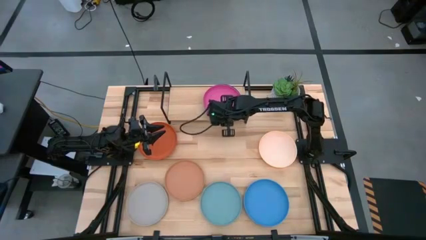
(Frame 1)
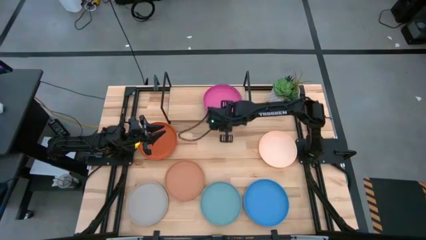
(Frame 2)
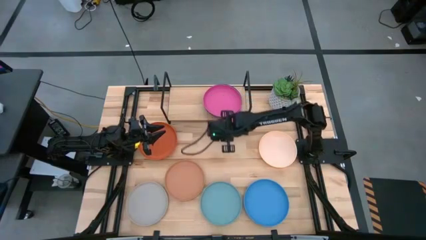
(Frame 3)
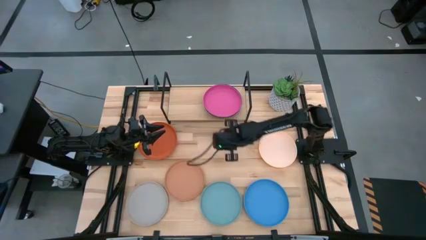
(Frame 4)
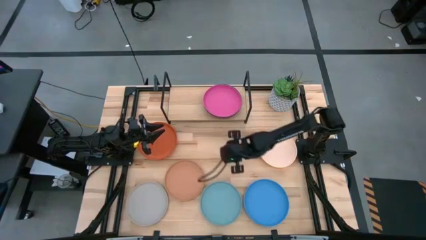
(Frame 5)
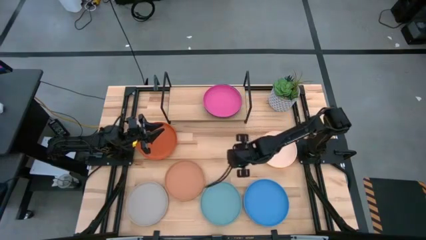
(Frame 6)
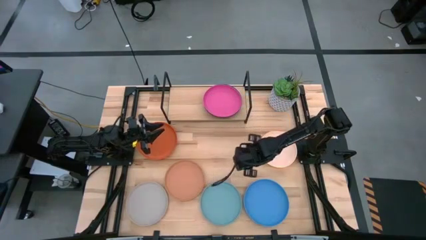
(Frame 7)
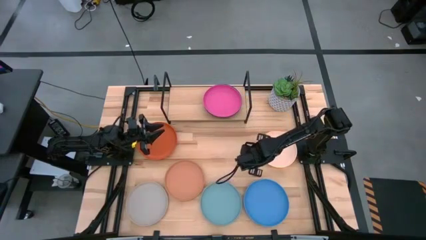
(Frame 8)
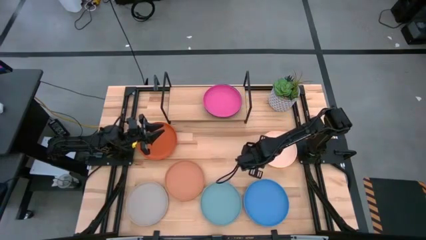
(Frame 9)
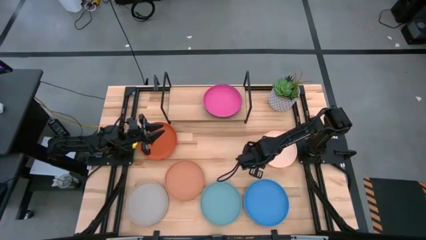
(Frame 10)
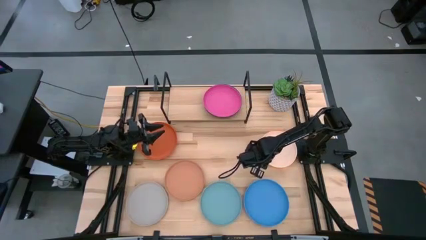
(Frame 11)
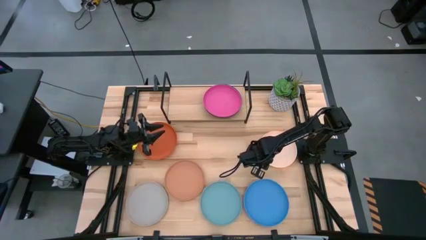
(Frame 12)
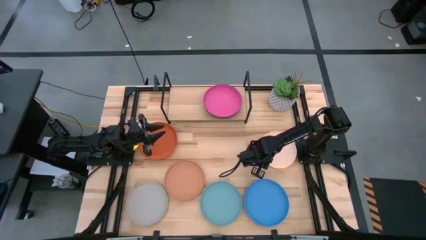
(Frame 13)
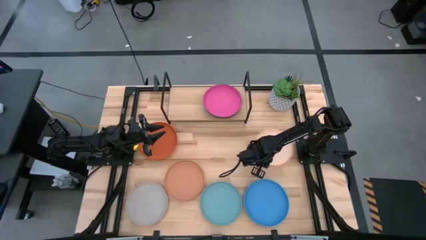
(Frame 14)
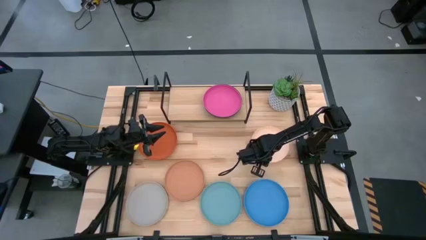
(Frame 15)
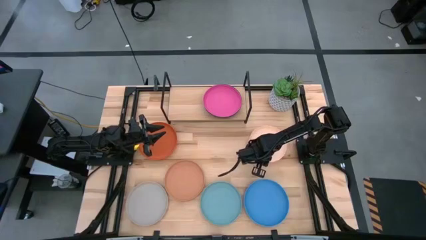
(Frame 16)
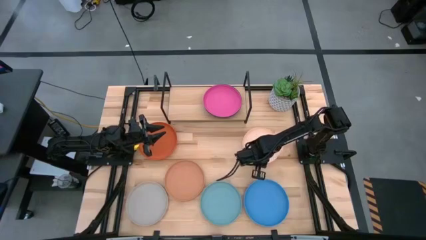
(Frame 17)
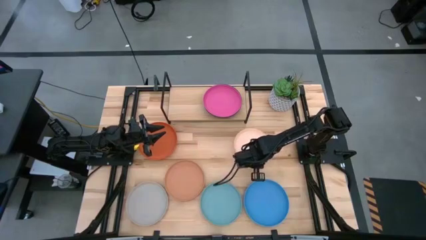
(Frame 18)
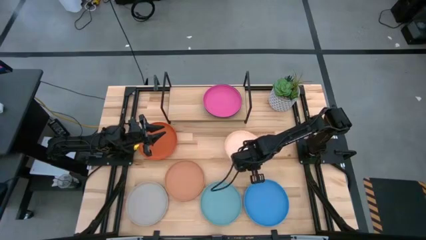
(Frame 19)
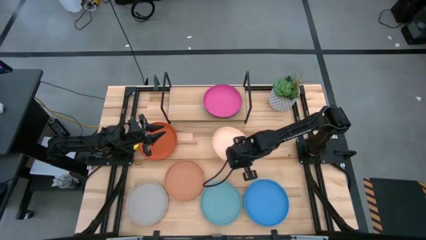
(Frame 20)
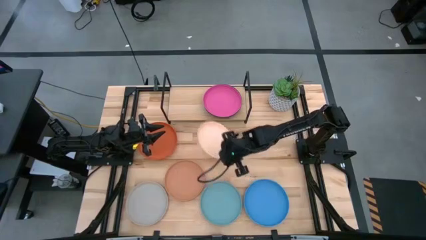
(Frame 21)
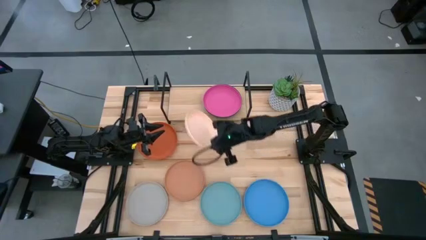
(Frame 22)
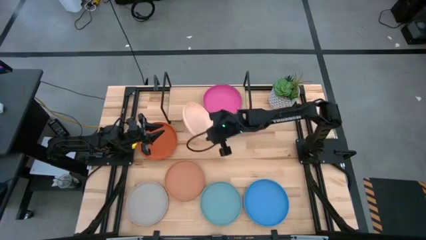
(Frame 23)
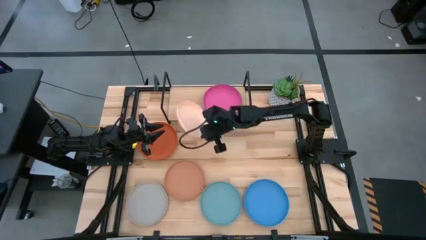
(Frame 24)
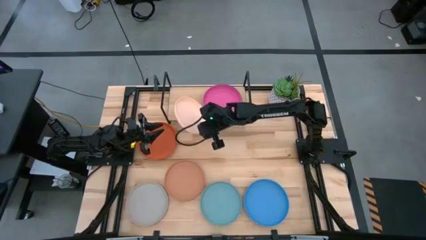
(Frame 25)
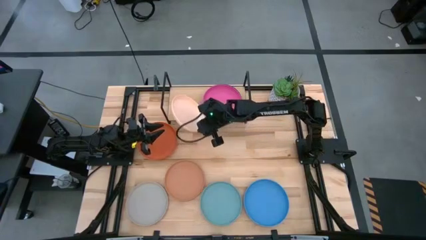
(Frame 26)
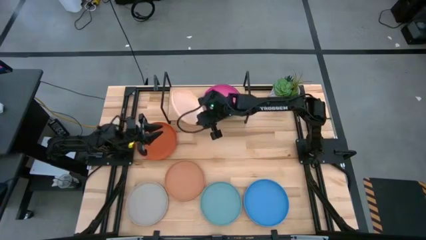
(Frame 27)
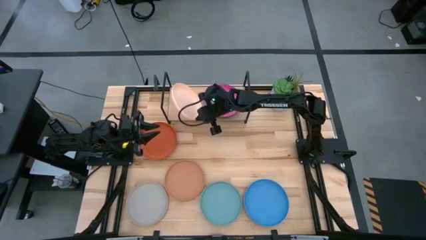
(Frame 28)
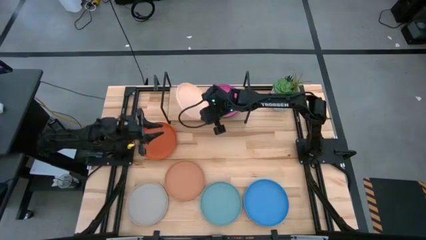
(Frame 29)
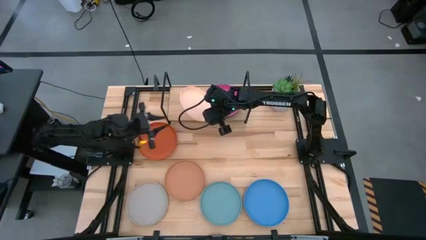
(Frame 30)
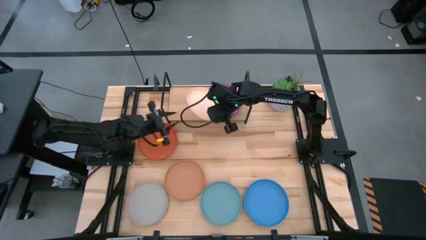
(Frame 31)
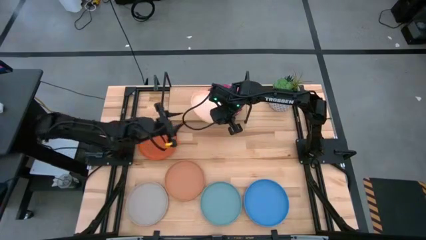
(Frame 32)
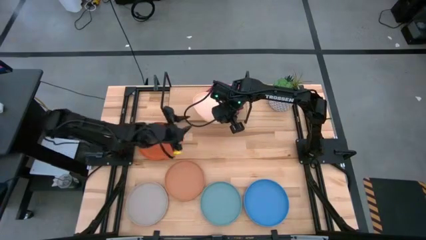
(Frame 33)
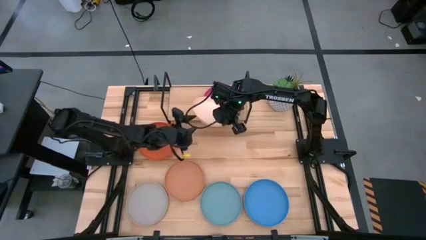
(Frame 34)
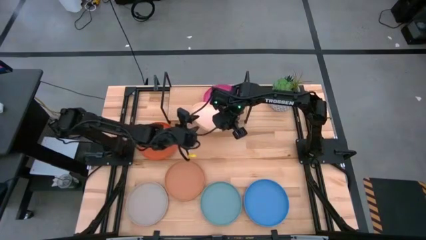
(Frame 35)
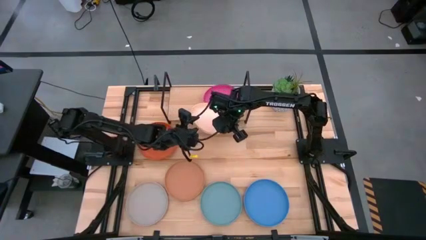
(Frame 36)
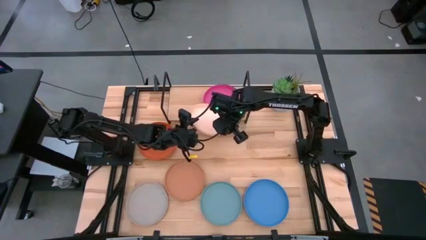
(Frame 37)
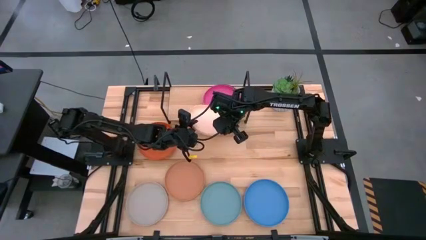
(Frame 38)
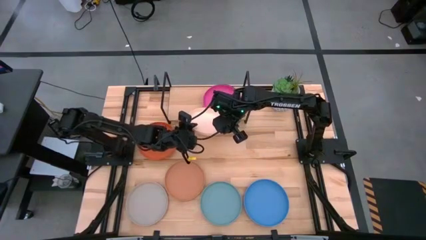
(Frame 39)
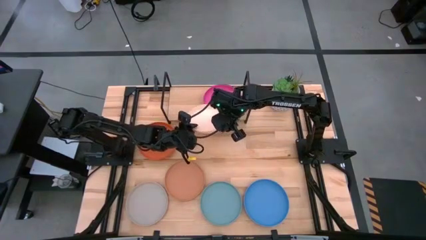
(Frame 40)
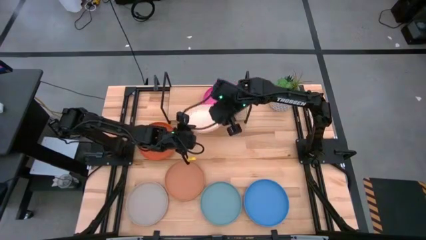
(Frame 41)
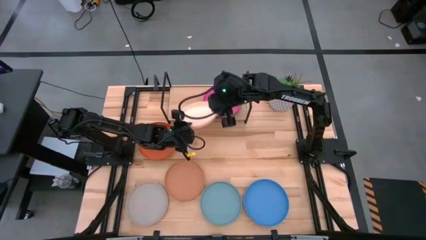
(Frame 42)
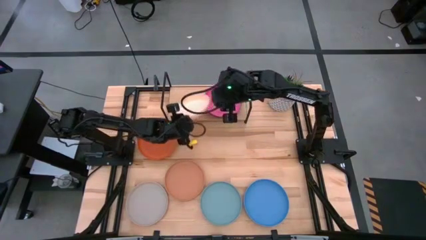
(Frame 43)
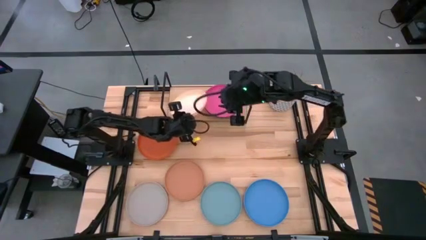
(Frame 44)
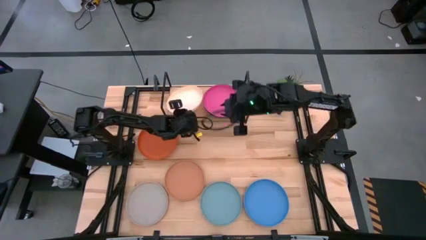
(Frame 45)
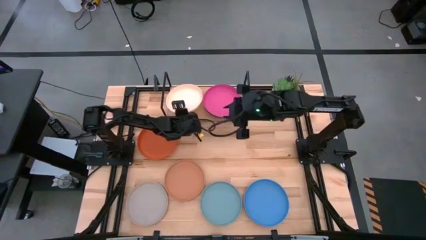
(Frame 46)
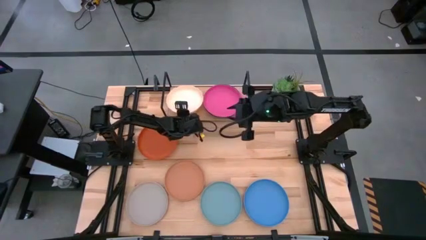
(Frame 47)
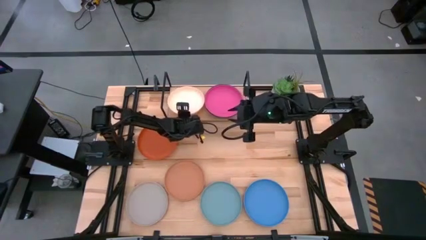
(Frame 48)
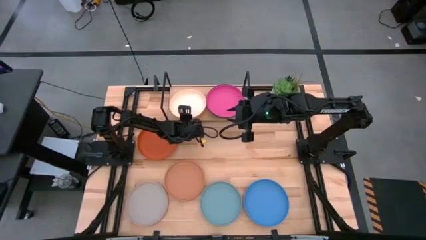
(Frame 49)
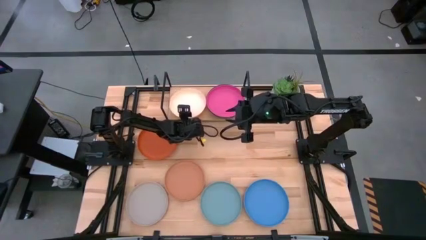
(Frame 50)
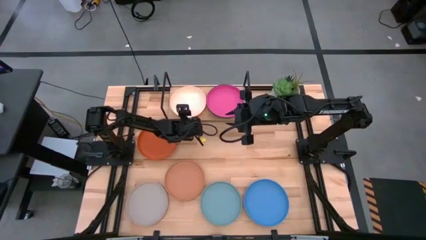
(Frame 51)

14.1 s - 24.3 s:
Task: Place and stack plates onto a shelf
Put the light orange plate on the shelf

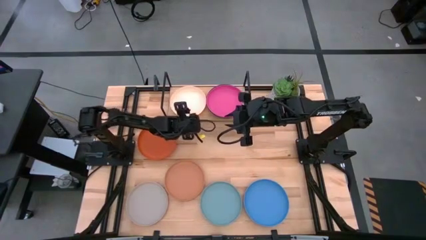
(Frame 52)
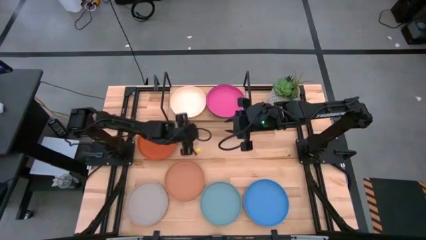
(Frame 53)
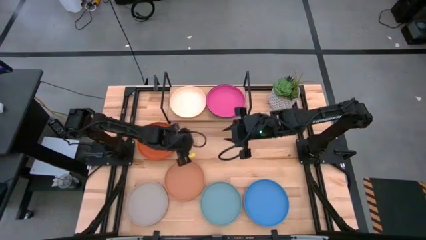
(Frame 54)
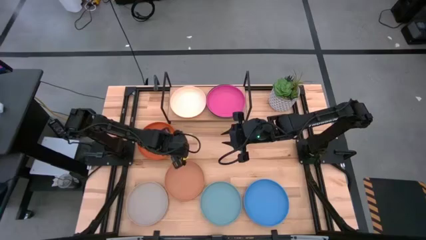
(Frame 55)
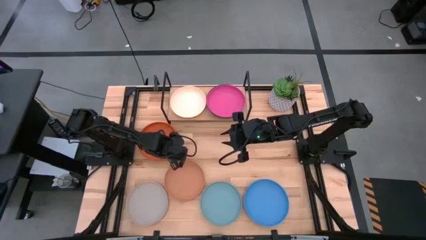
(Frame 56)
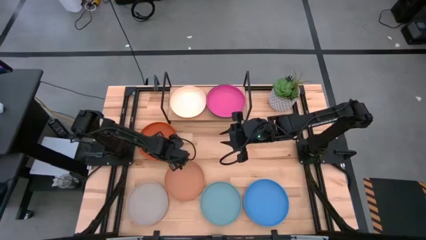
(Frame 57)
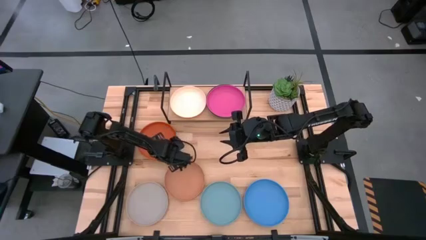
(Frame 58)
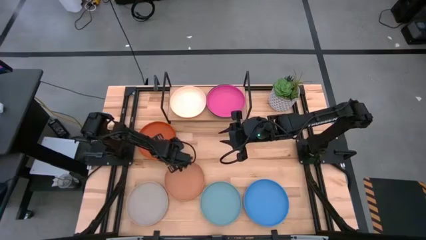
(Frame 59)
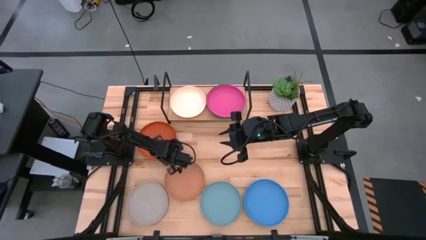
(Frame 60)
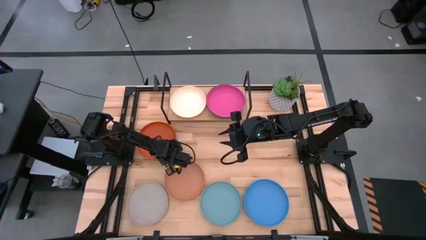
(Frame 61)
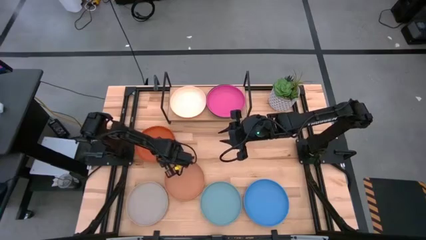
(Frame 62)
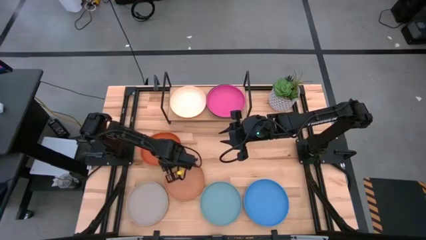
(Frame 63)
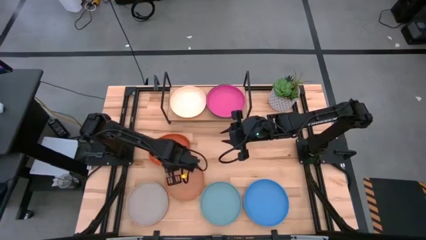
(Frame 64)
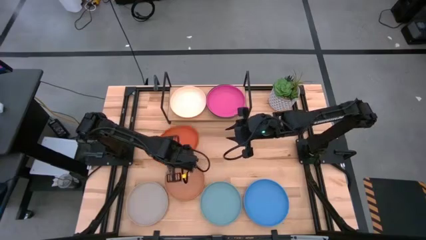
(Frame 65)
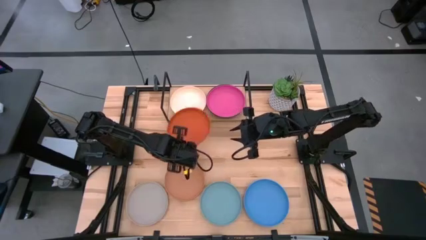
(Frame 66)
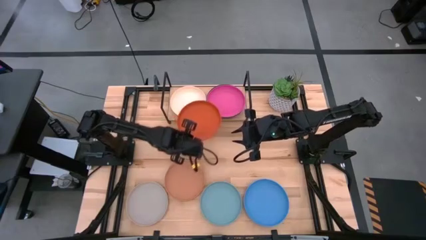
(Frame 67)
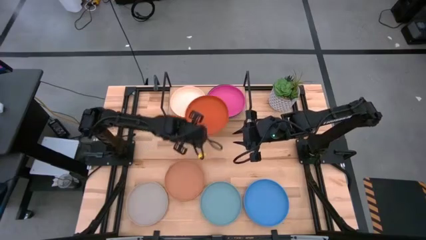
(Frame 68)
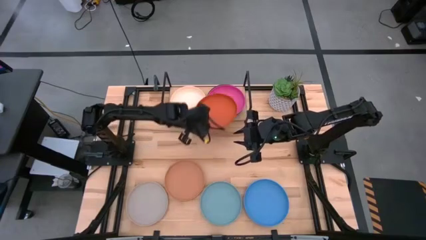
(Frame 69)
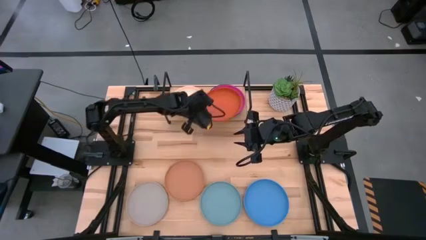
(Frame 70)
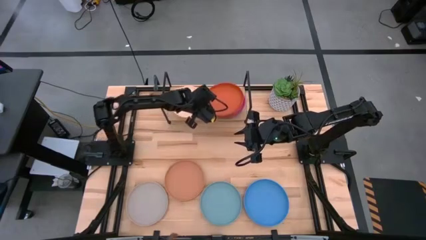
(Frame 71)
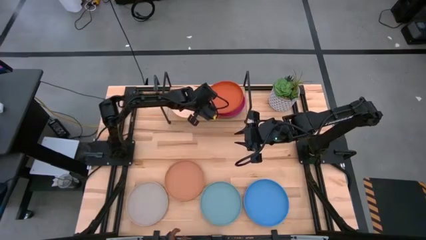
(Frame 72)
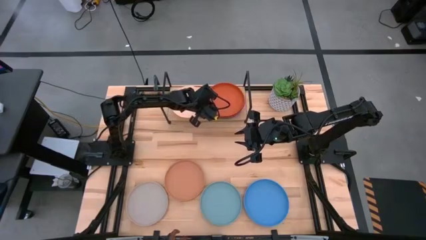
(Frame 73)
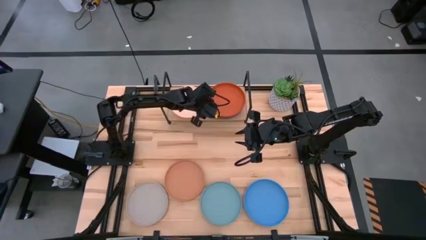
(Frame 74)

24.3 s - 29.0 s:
Stack the orange plate on top of the pink plate on the shelf
